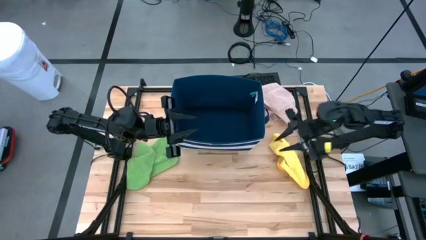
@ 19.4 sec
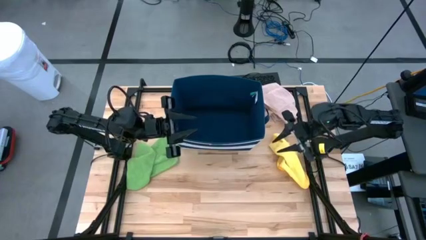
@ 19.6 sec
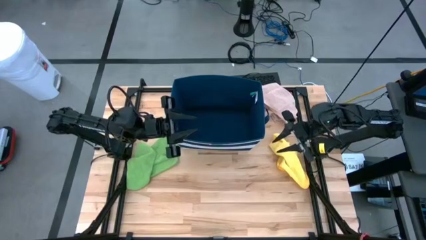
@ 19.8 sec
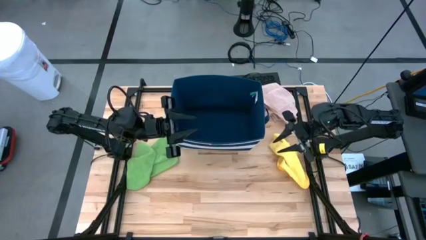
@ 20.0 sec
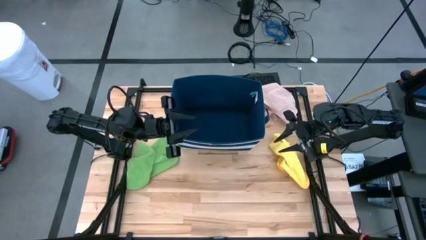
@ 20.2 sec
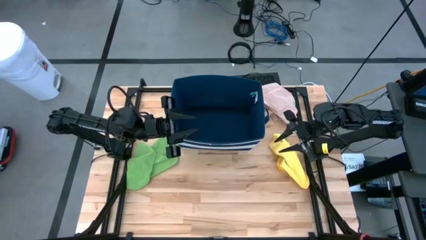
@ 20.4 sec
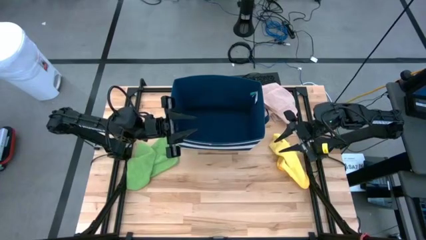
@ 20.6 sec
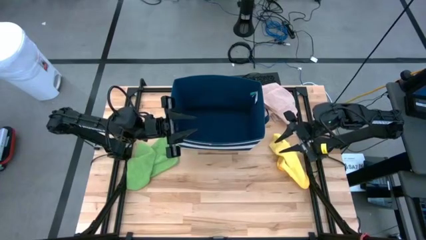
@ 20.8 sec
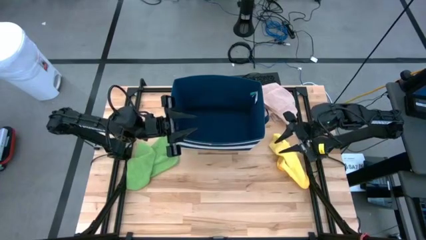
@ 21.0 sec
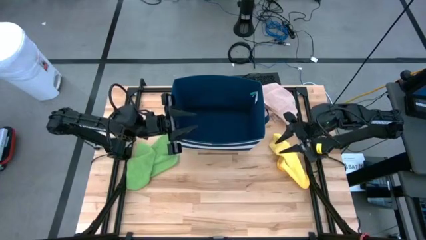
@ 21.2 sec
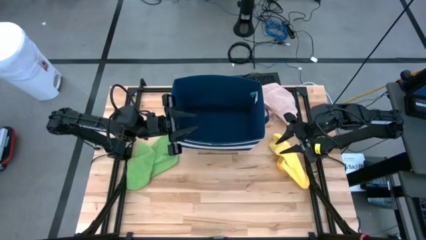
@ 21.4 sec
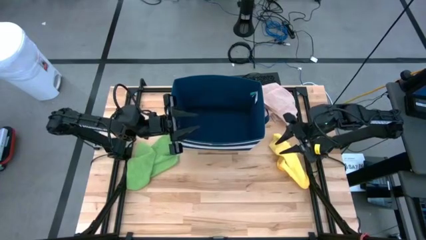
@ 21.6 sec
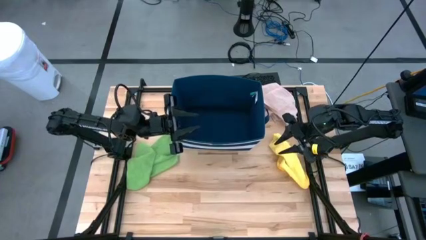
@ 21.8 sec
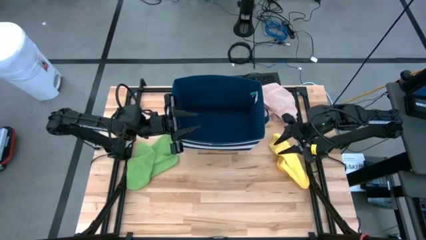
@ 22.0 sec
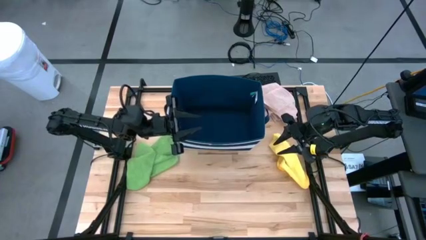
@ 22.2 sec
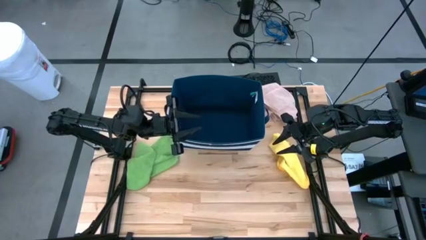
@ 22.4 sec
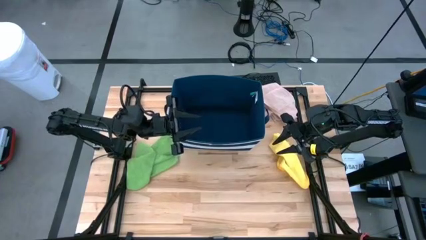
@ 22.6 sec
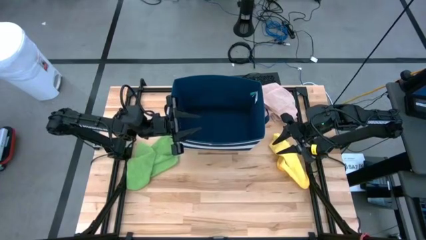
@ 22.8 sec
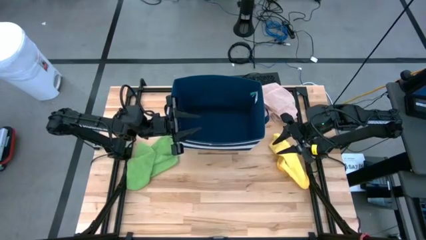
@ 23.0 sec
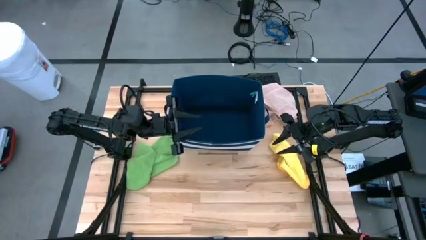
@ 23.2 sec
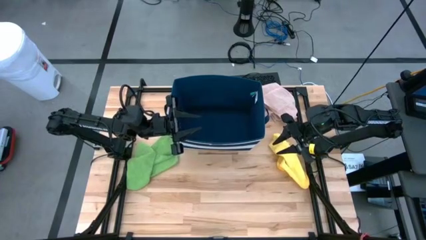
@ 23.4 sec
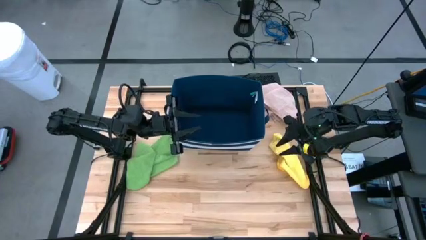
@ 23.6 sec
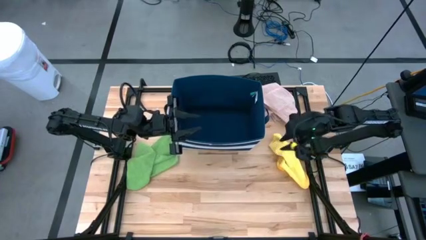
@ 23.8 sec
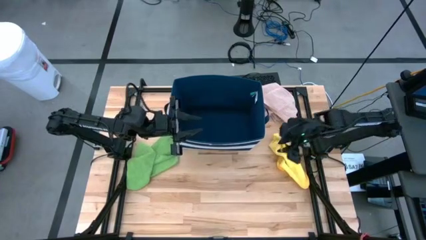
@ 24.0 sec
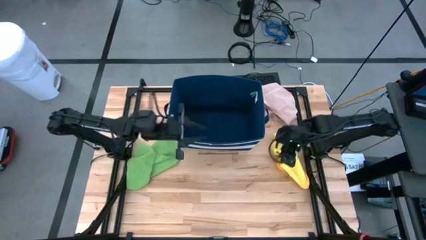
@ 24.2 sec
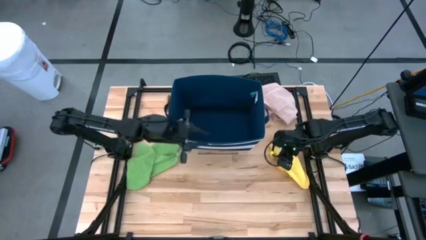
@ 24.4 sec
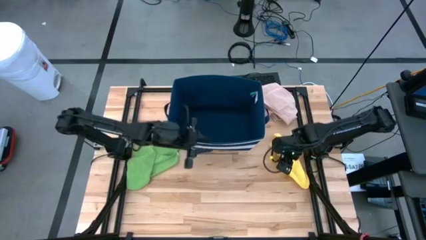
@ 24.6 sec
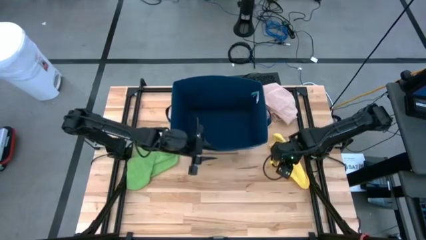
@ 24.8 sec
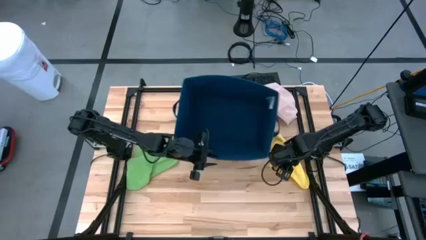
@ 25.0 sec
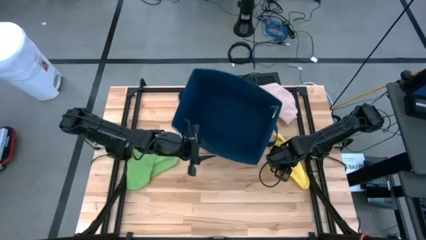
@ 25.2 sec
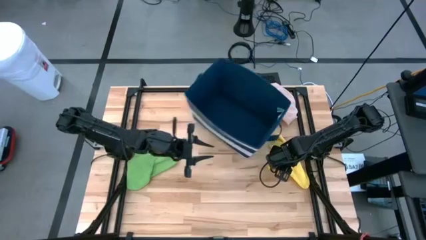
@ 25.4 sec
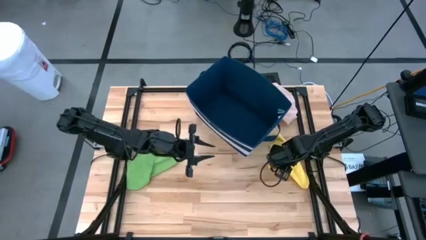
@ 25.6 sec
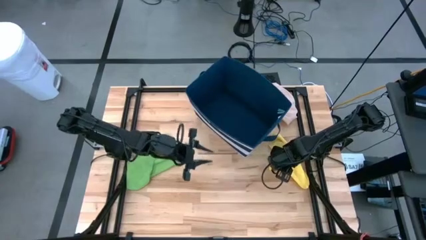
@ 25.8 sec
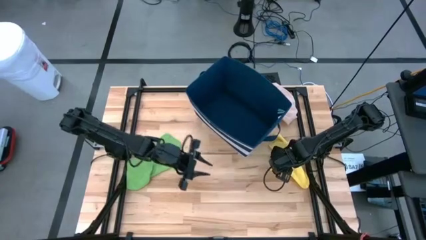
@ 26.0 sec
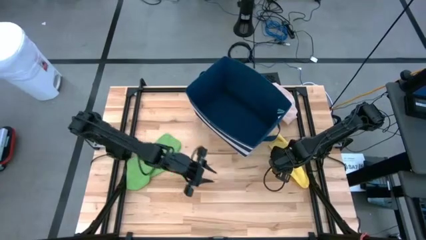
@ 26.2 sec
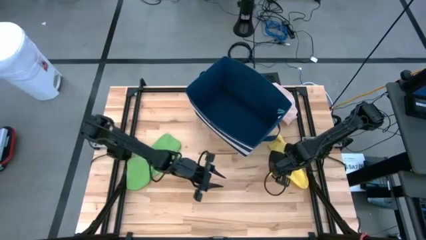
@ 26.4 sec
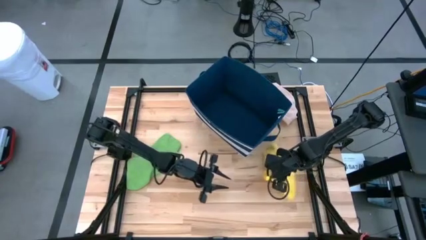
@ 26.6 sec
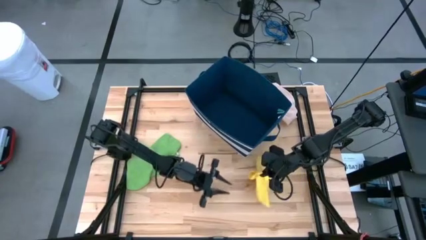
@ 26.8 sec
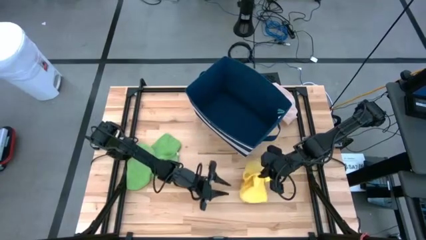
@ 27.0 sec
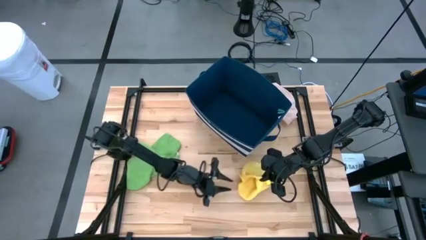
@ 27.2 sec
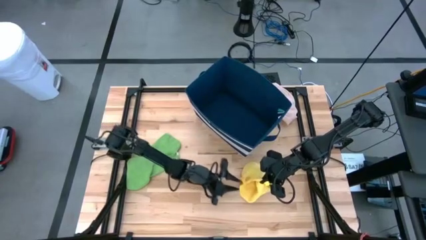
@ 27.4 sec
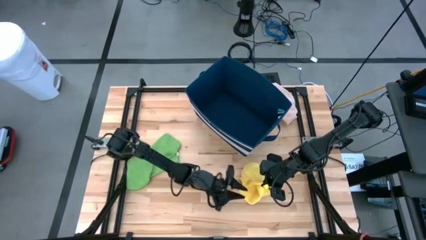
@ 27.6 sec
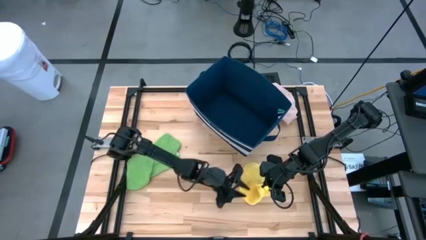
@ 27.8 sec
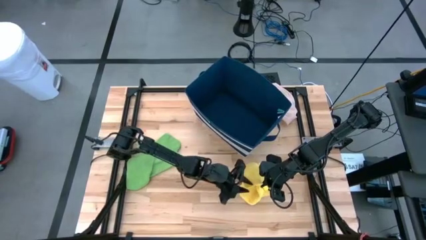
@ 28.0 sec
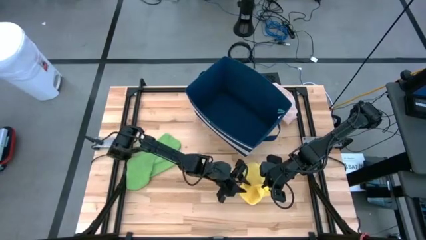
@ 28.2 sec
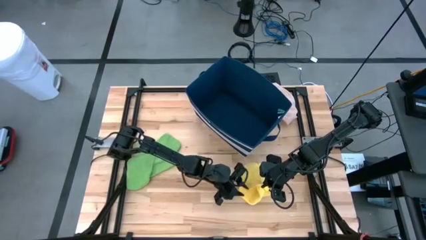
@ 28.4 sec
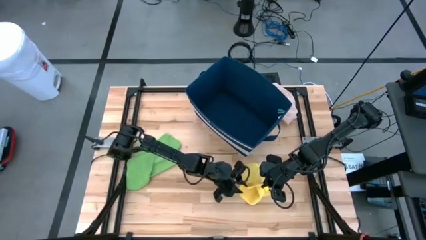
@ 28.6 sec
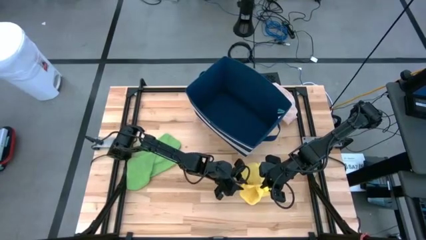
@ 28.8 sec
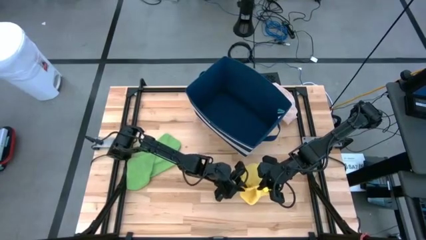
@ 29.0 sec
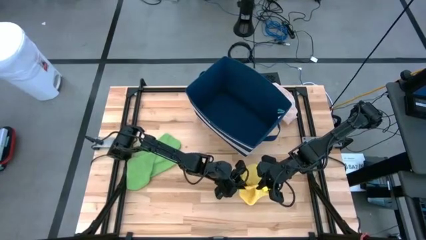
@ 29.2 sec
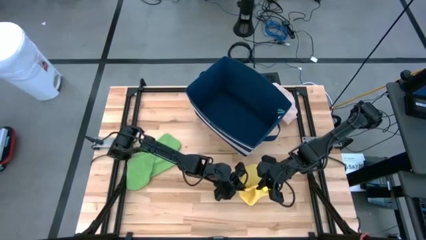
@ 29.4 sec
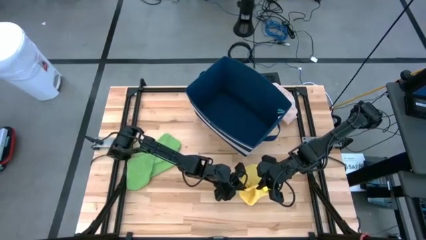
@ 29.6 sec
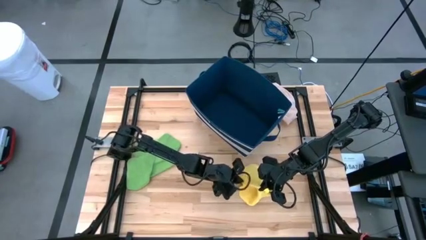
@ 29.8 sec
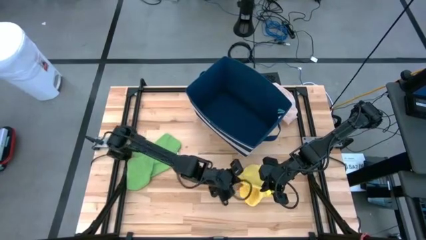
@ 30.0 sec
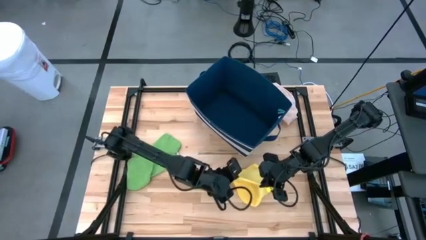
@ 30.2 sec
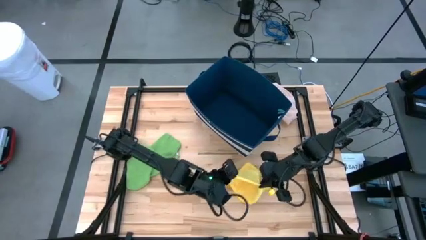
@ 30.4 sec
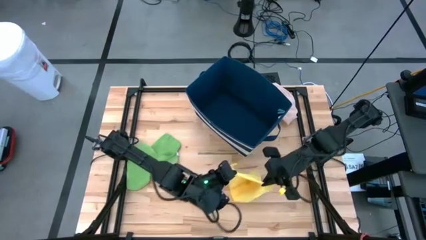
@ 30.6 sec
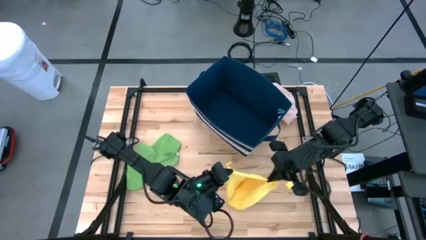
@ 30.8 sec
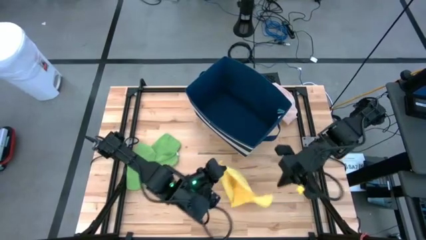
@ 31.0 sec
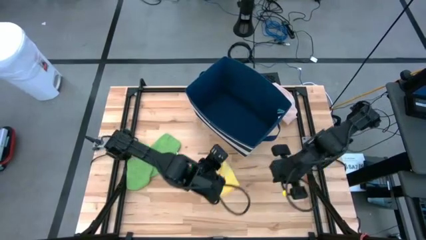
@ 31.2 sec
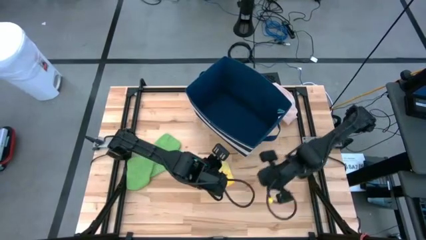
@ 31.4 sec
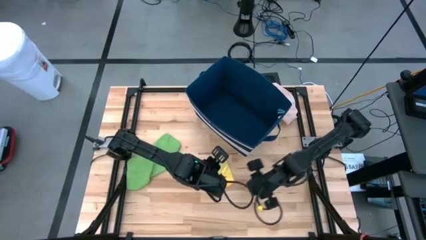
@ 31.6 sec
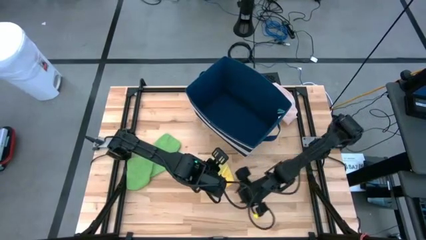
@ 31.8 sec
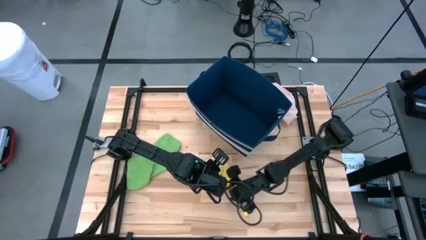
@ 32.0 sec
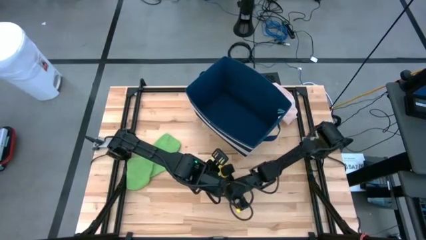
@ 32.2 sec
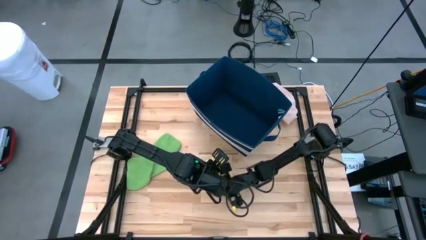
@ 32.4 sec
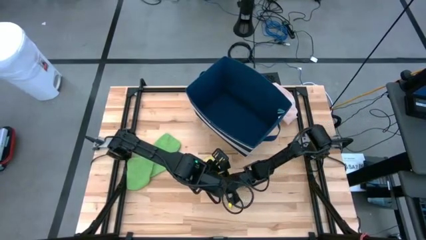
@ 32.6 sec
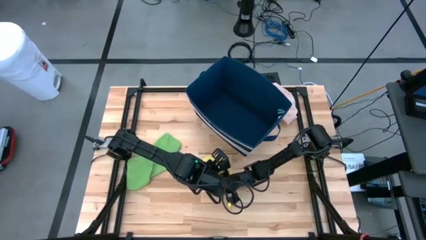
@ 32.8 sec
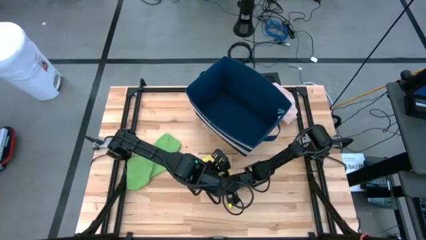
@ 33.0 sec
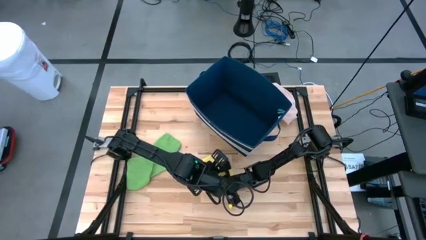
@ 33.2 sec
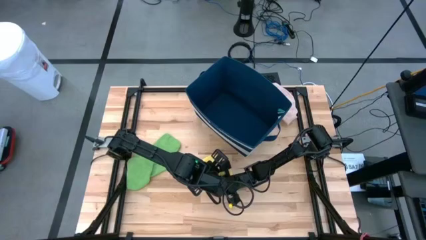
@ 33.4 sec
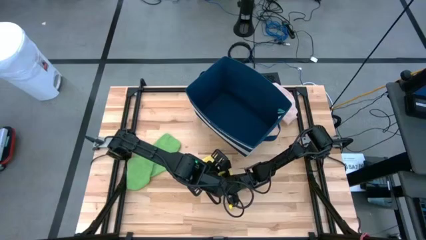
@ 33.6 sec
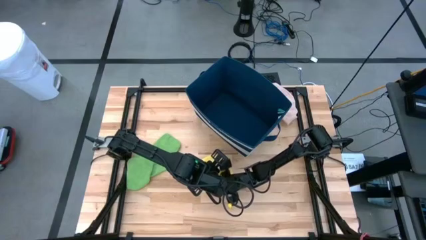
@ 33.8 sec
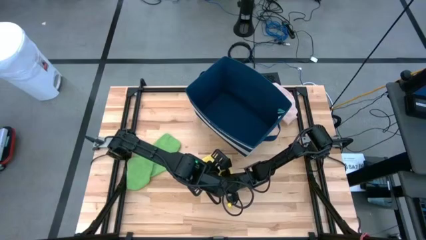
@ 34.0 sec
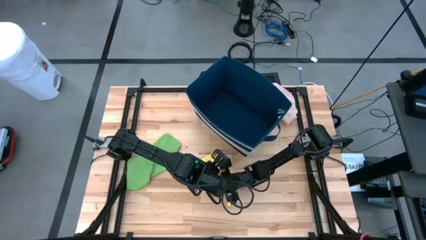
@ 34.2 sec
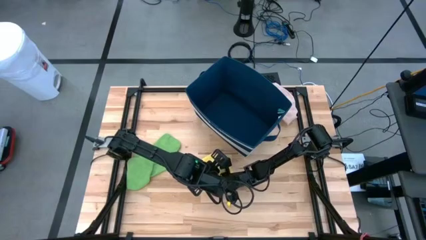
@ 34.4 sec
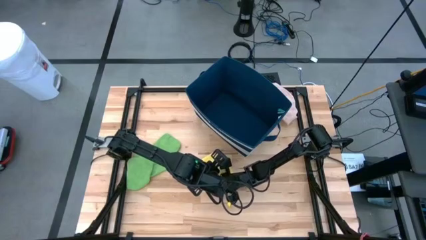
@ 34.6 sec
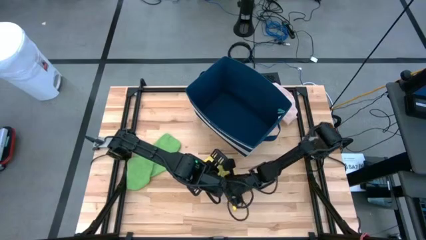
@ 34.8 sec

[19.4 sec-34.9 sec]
Task: Fold towel
Fold the yellow towel
